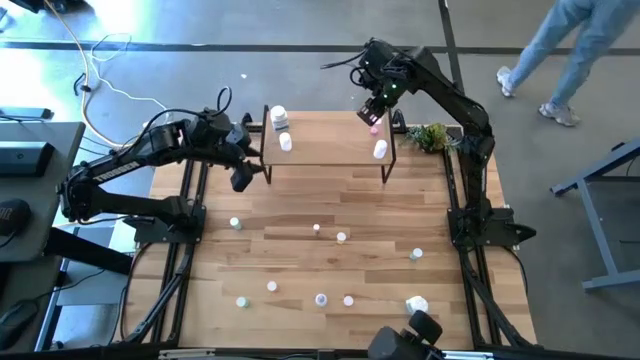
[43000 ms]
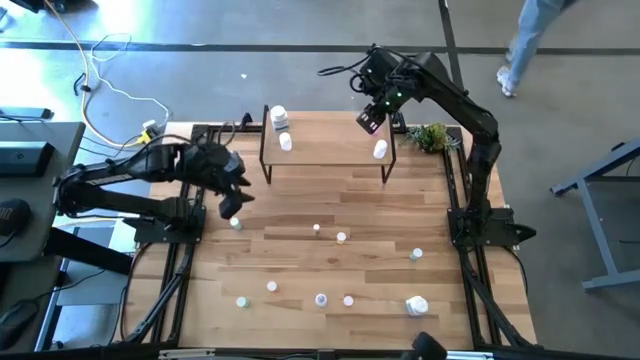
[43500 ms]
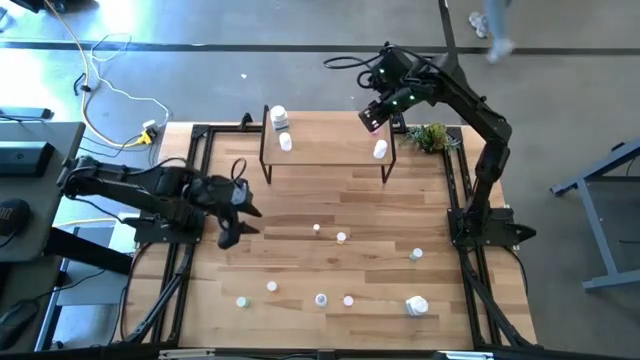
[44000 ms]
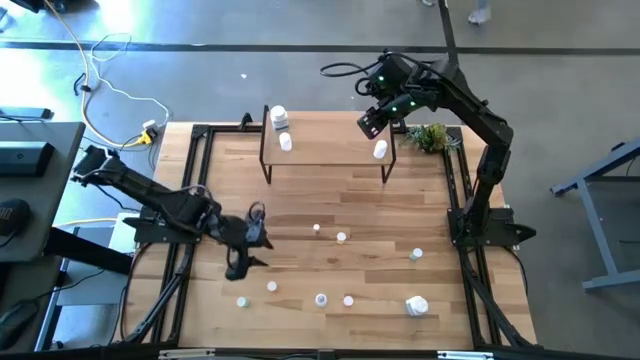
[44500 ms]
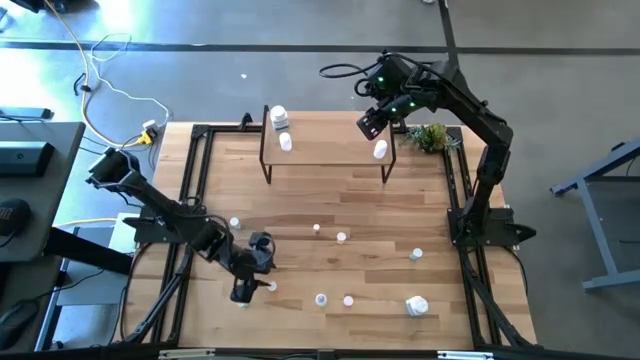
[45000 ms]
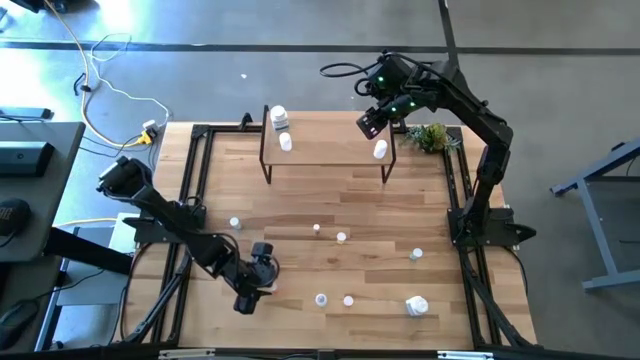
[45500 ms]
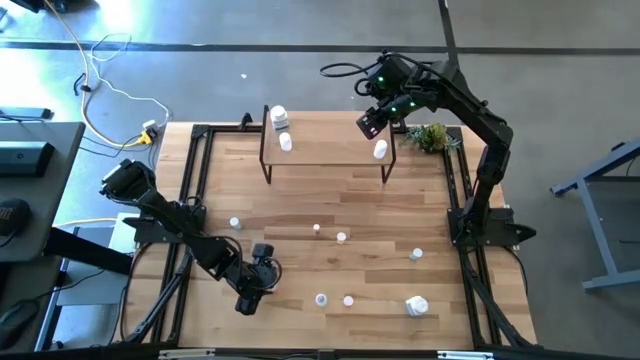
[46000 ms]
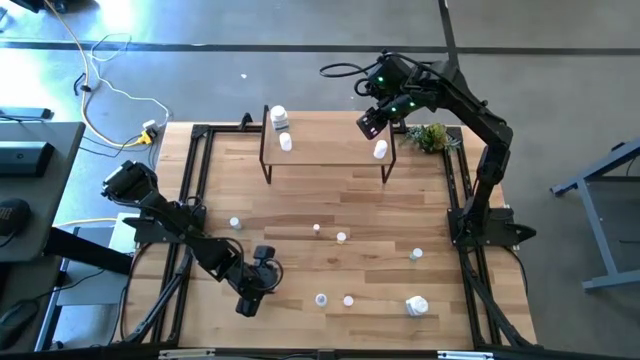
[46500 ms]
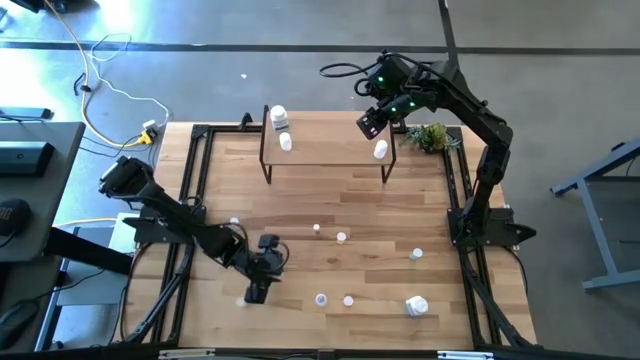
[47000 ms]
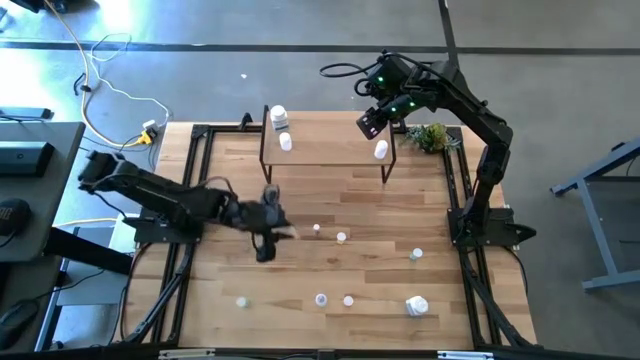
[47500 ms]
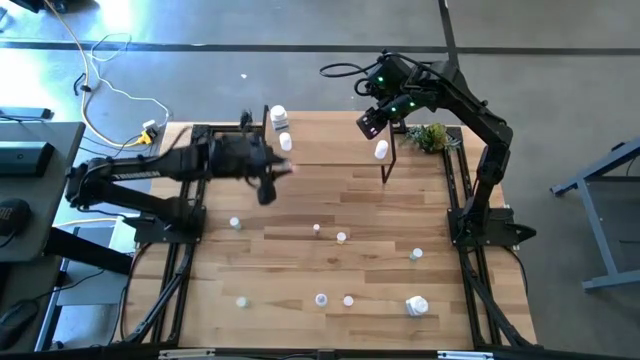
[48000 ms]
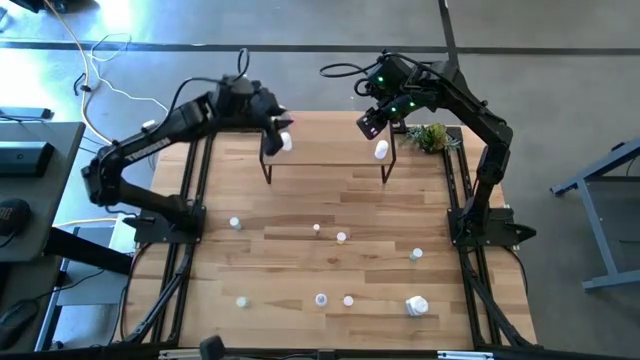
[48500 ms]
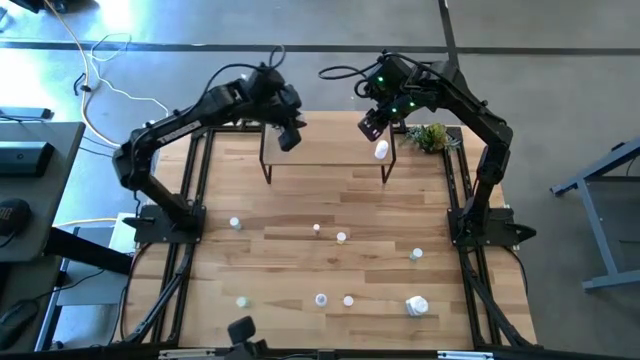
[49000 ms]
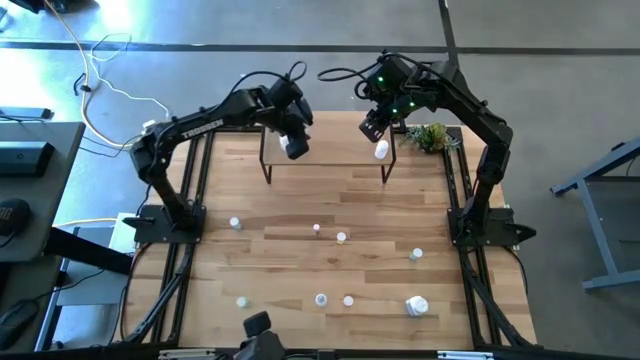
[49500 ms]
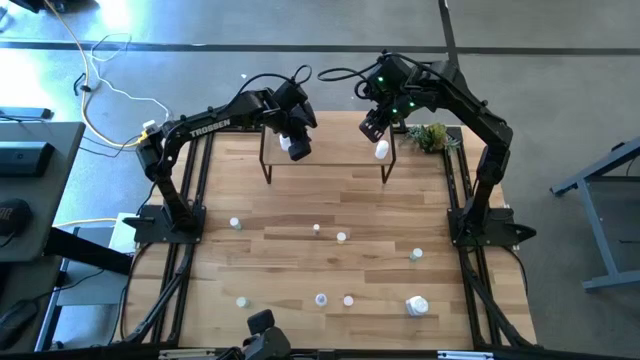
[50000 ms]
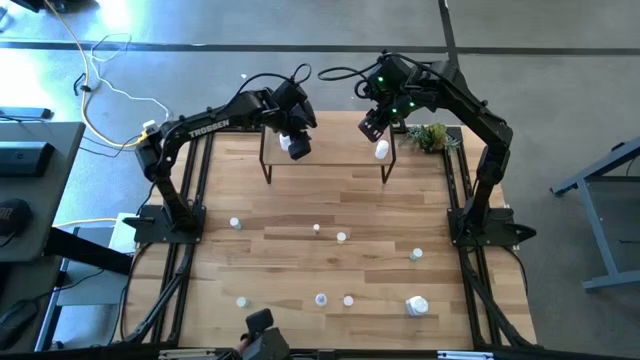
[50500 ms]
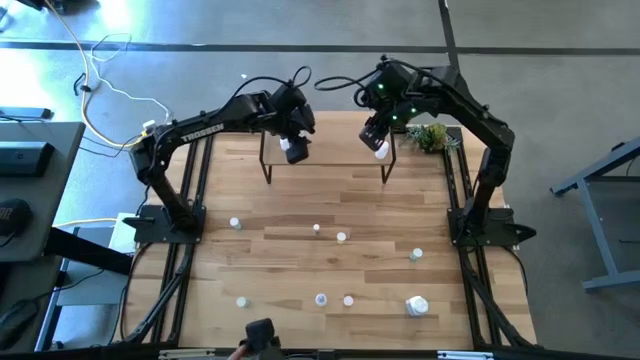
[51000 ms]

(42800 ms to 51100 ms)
Task: Pick and place medicine bottles onto shelf by color
Put the left pink pill bottle on the shelf

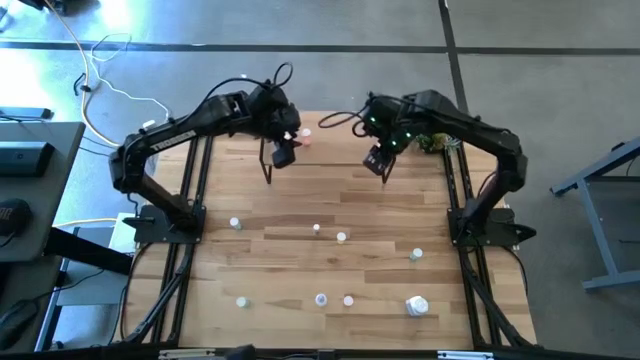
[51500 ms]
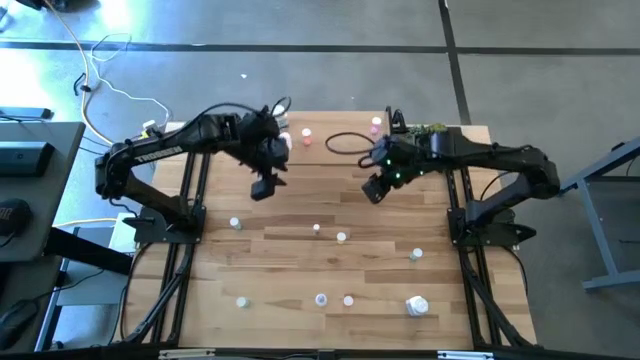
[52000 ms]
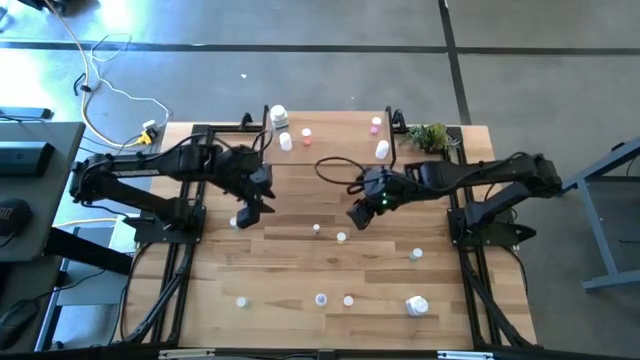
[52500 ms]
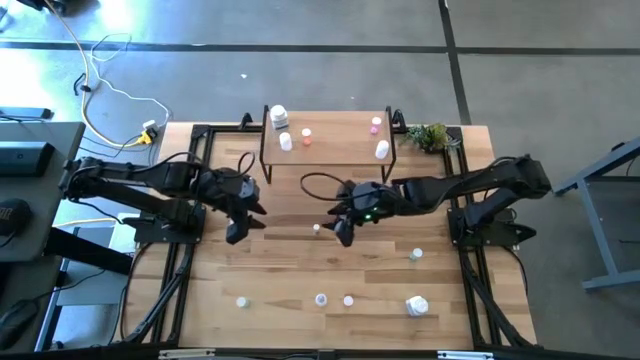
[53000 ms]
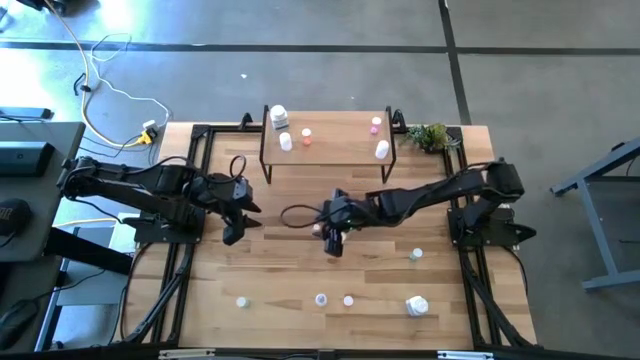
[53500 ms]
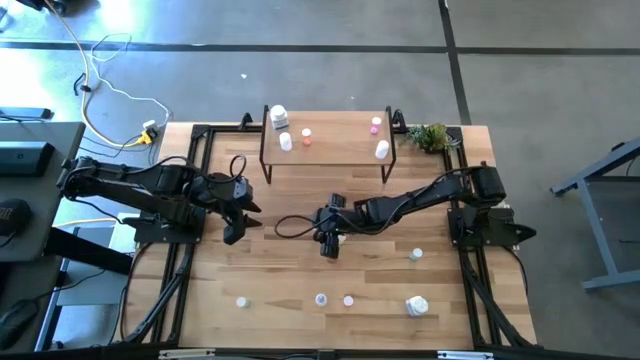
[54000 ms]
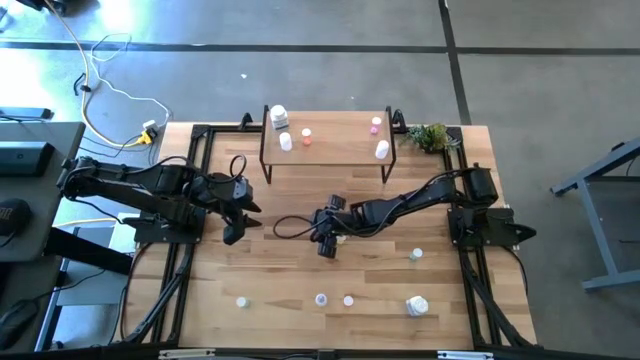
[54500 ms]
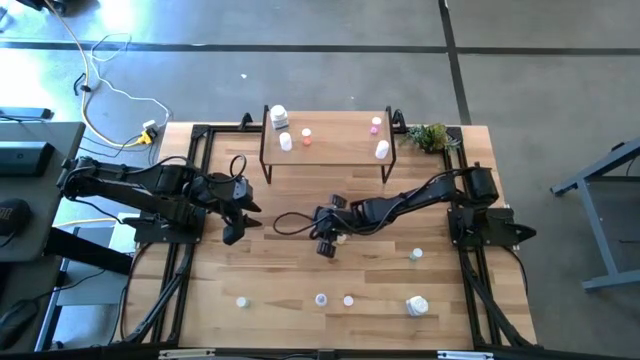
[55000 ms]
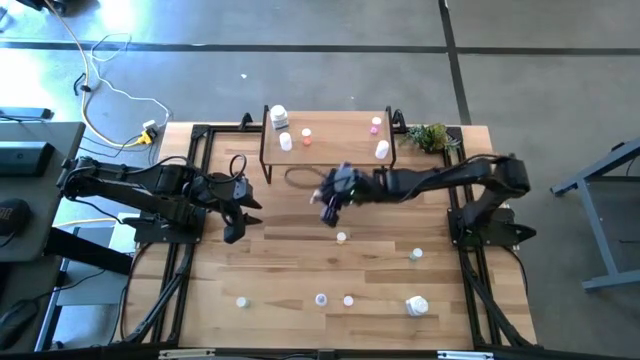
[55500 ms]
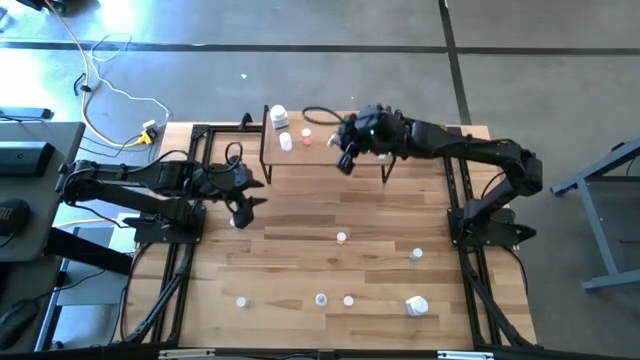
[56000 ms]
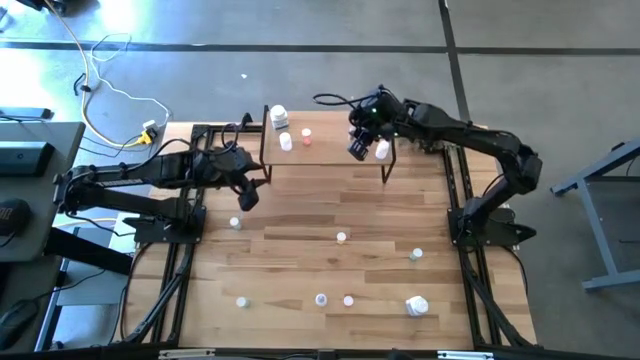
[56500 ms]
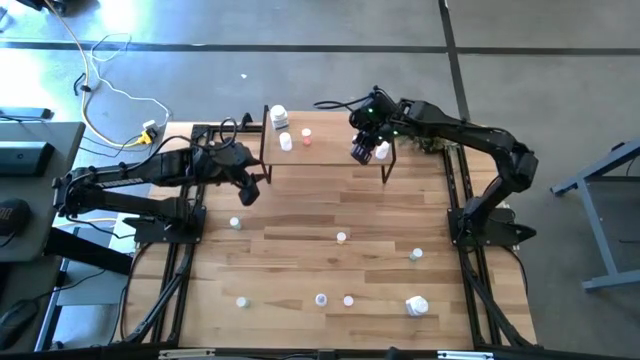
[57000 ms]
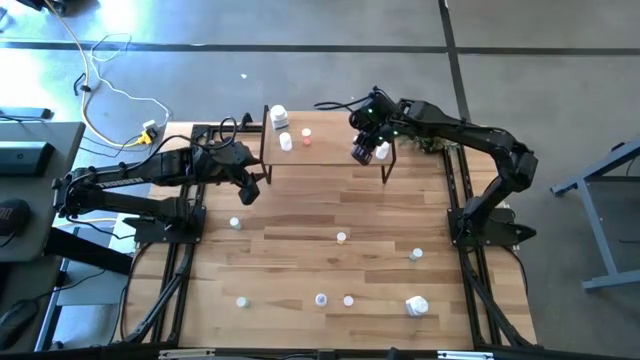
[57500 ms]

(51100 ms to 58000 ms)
Put the thin white pill bottle on the shelf

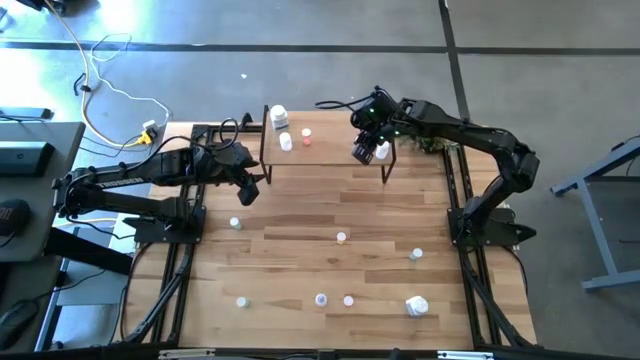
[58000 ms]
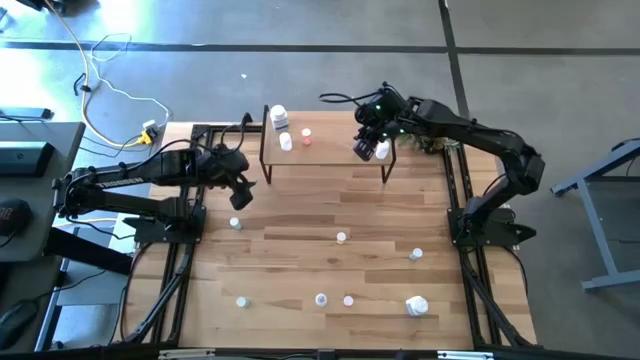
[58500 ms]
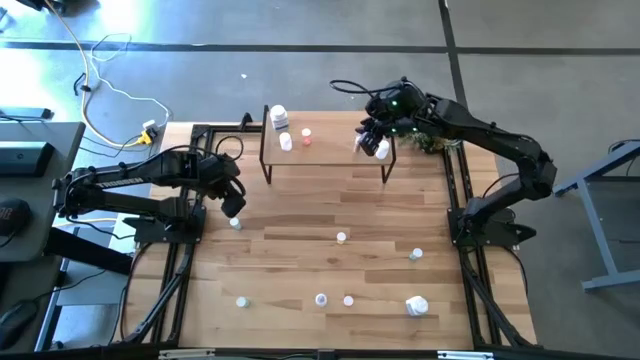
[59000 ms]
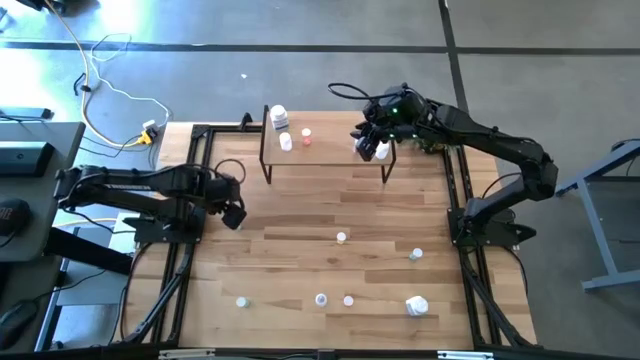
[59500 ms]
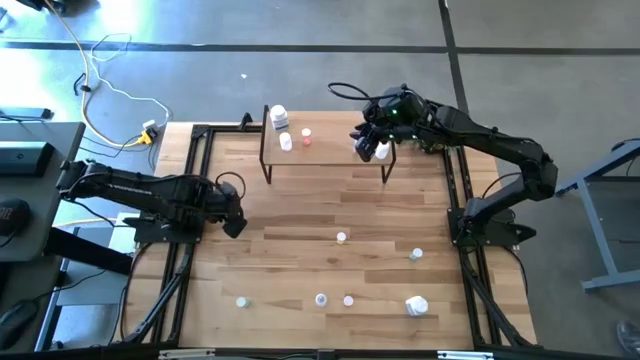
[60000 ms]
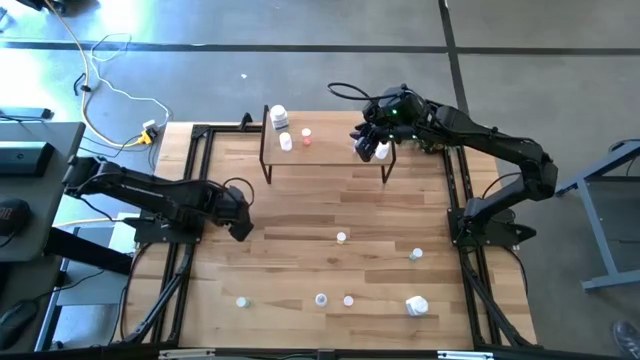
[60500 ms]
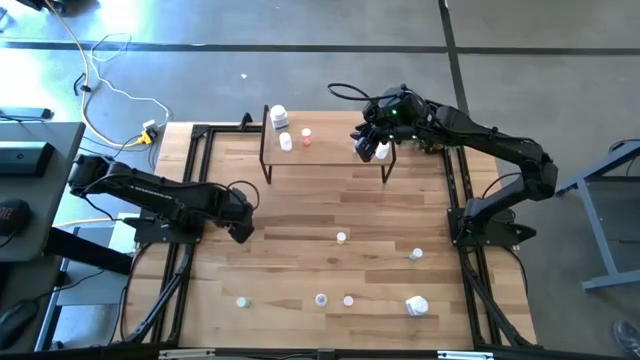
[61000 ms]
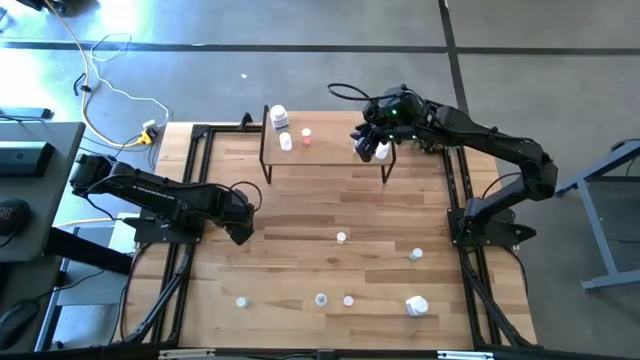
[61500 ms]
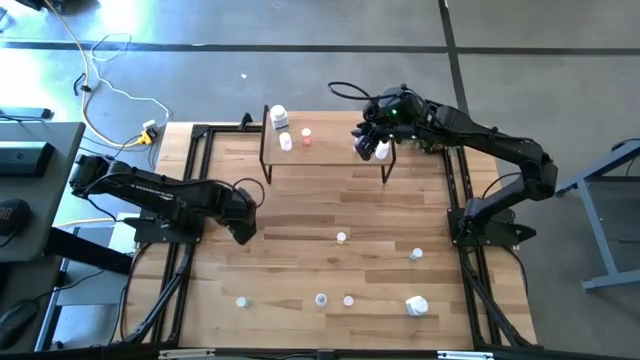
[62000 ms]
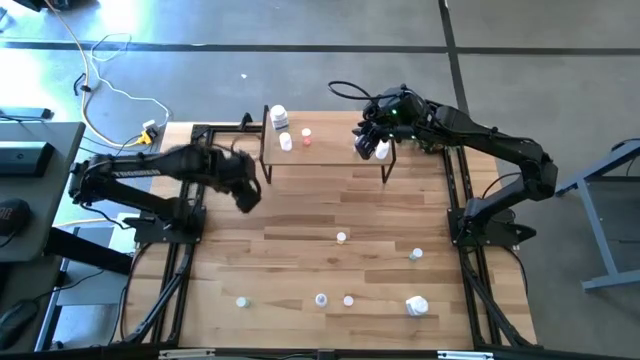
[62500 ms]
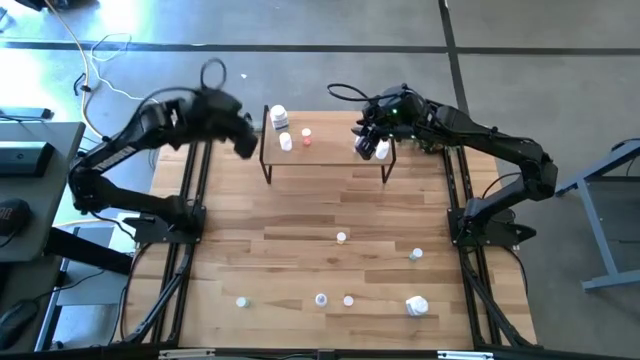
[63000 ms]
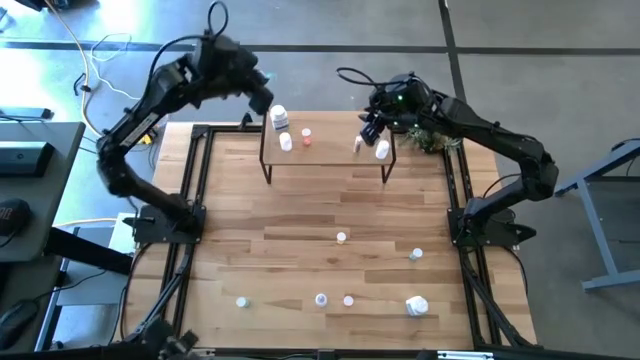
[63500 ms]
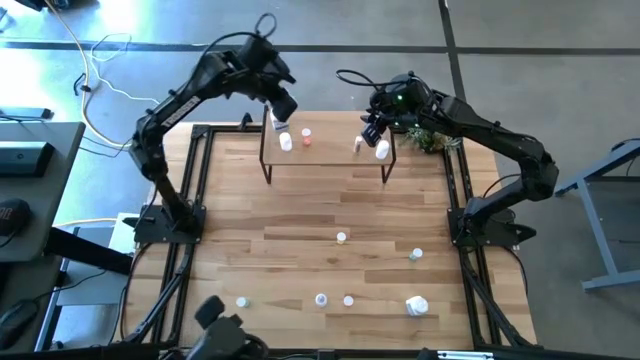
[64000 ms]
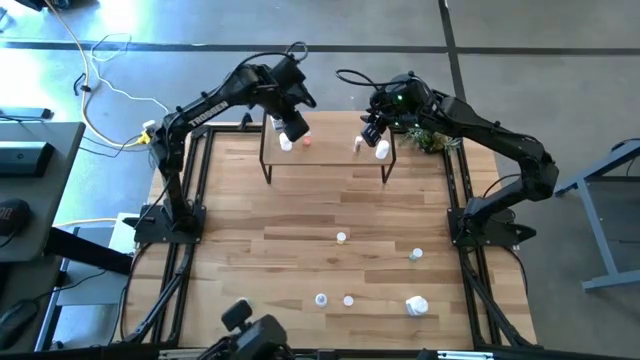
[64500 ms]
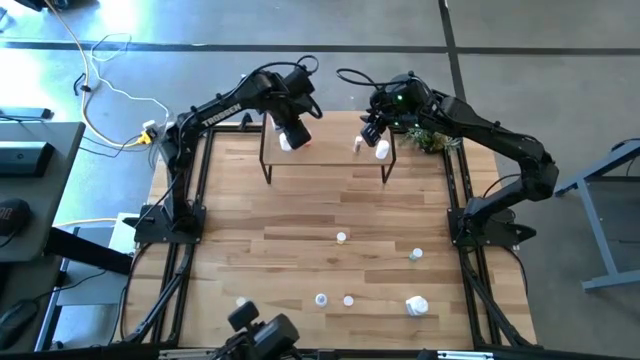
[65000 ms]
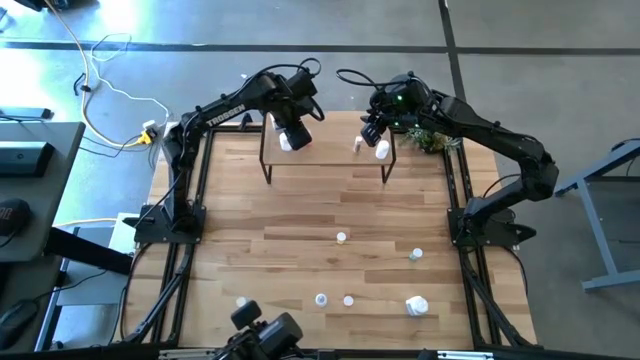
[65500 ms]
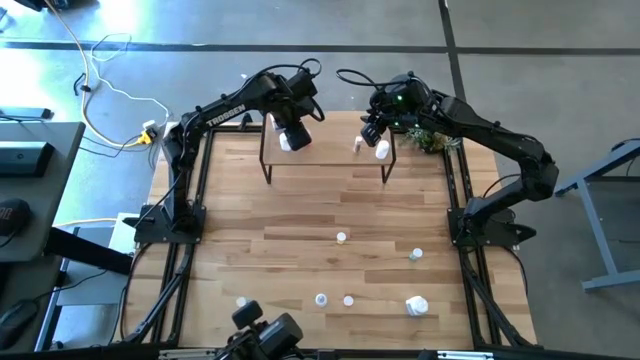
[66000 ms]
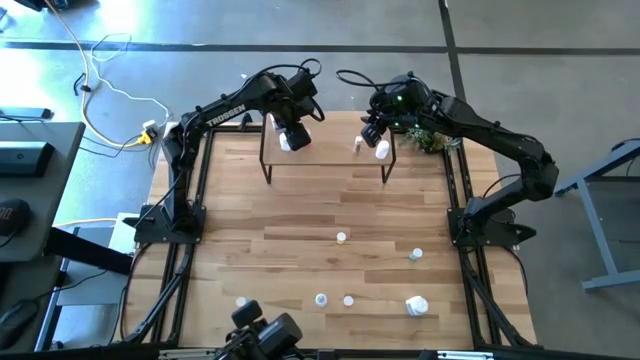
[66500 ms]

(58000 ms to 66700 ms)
Put the top left blue pill bottle on the shelf
